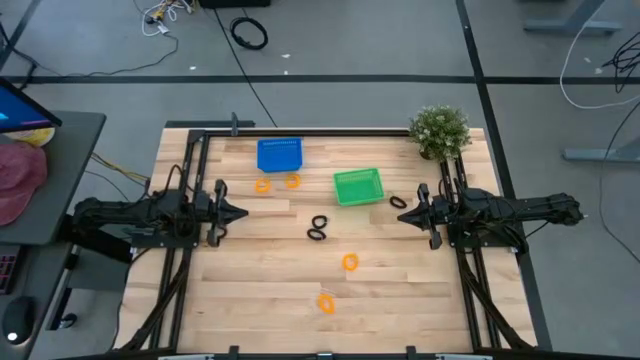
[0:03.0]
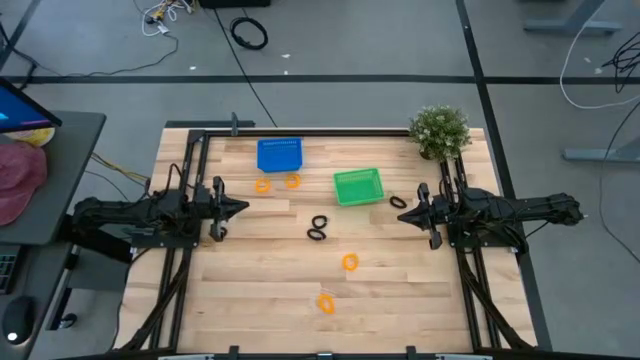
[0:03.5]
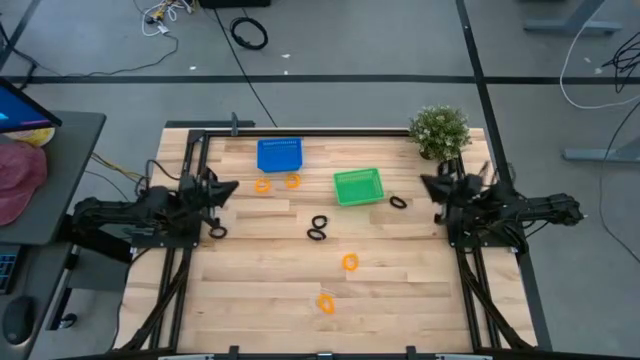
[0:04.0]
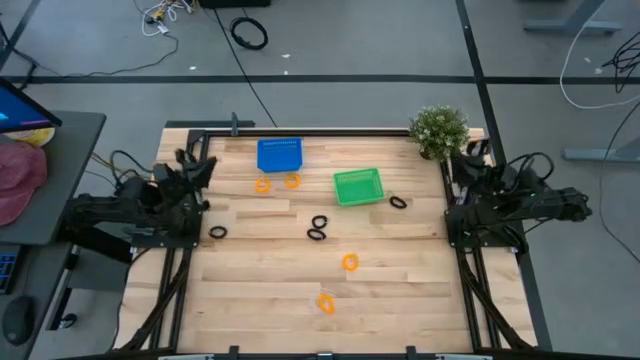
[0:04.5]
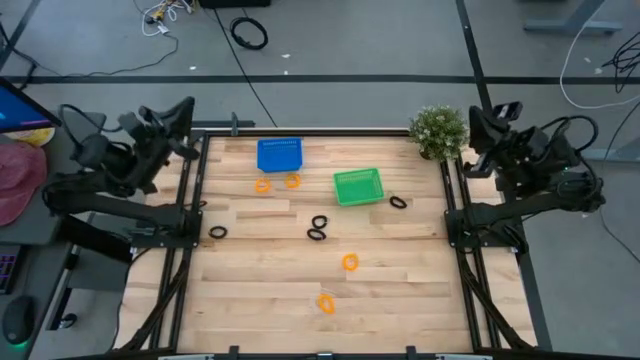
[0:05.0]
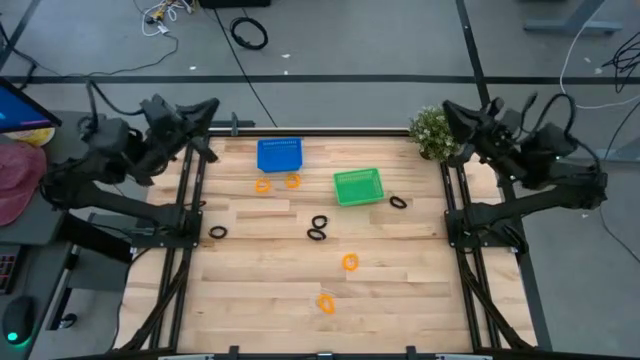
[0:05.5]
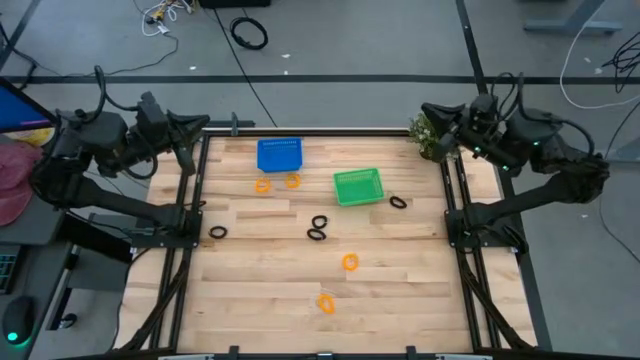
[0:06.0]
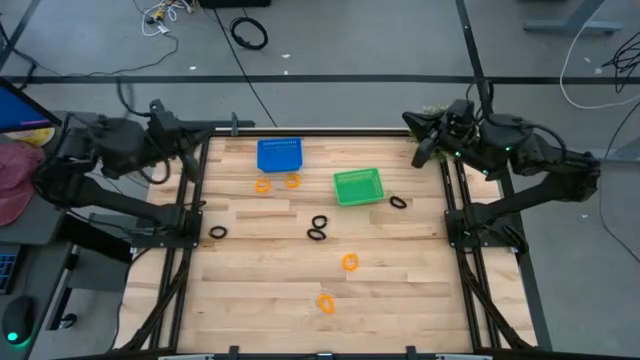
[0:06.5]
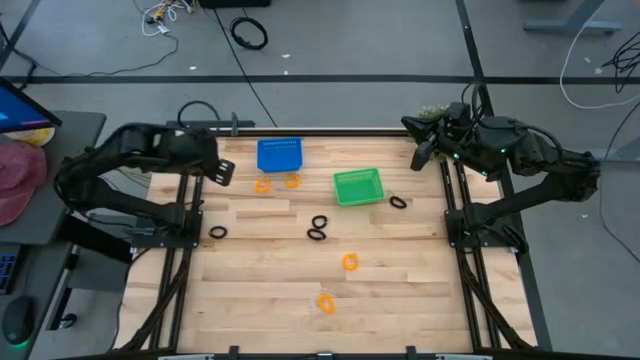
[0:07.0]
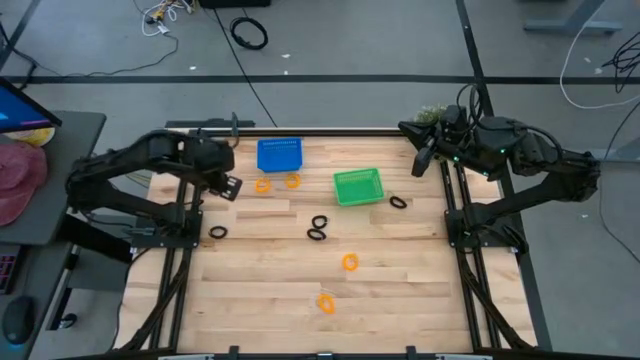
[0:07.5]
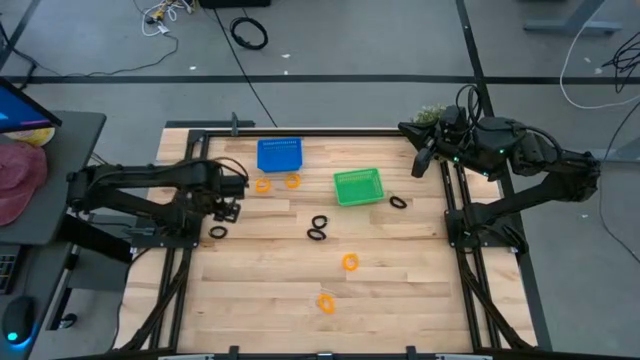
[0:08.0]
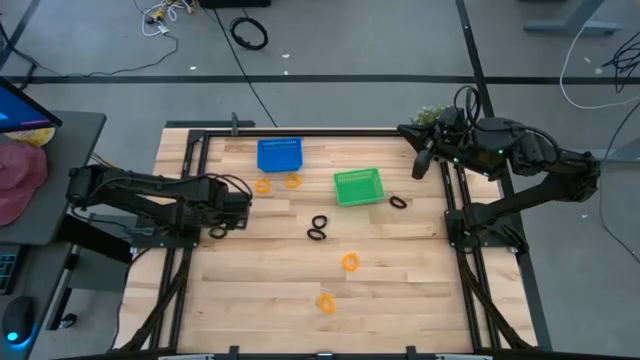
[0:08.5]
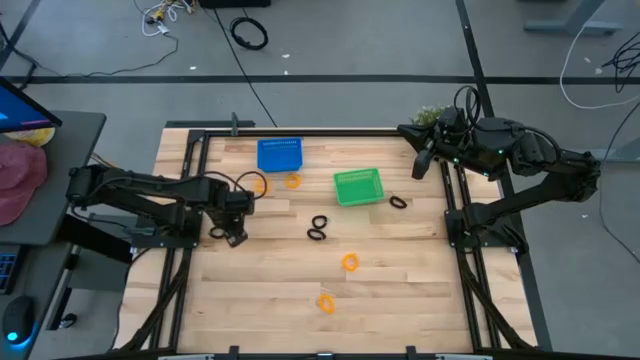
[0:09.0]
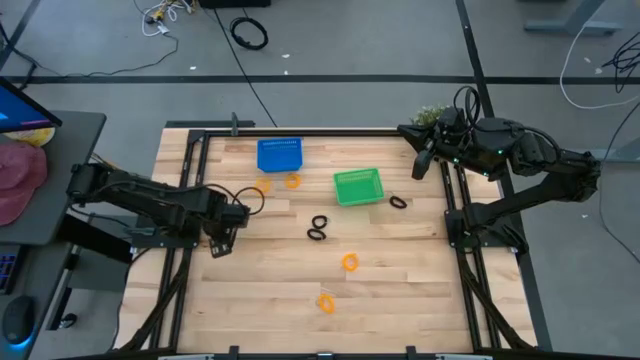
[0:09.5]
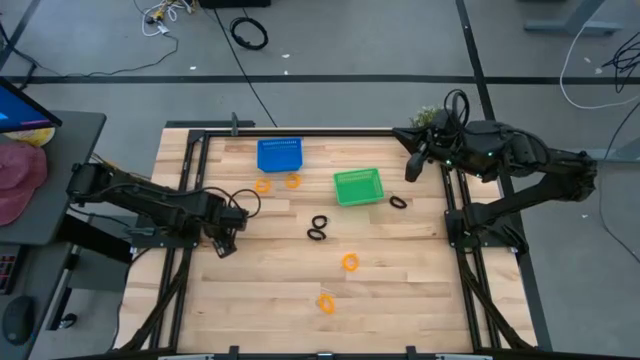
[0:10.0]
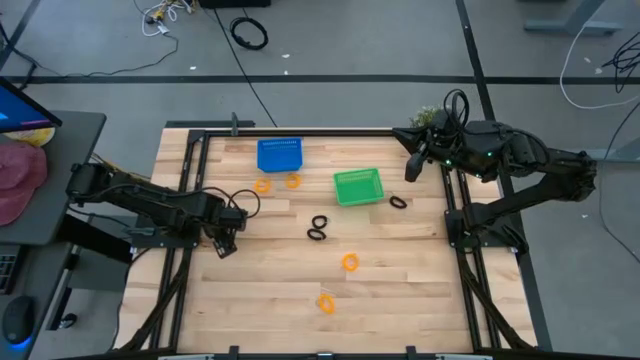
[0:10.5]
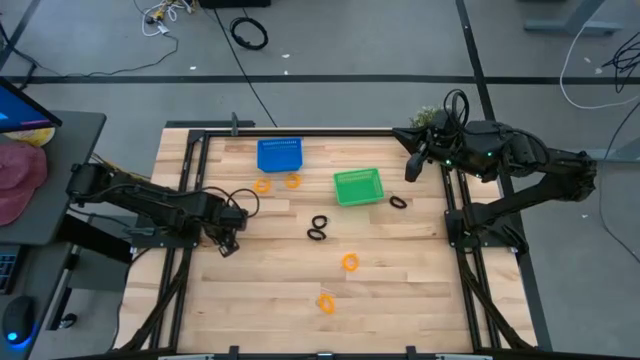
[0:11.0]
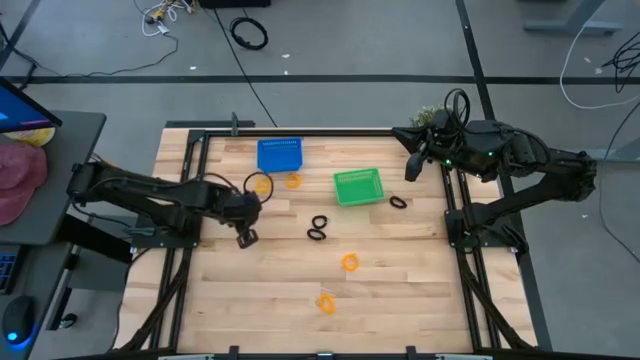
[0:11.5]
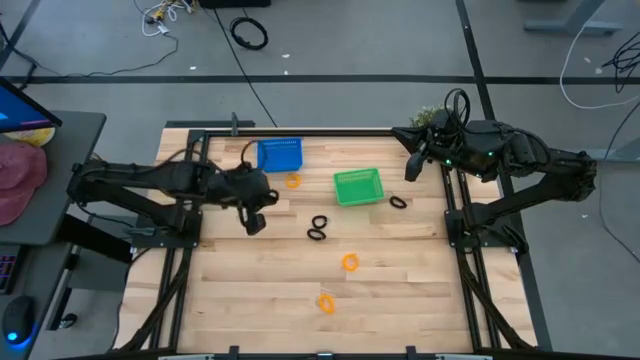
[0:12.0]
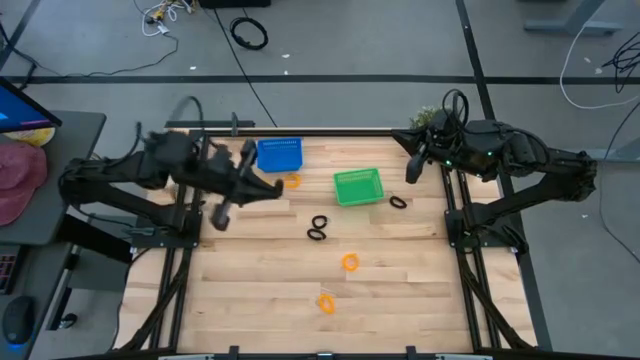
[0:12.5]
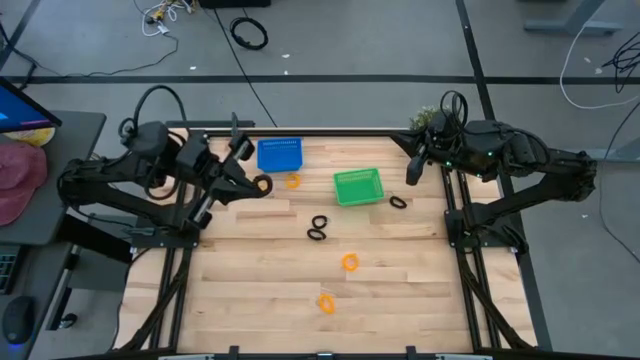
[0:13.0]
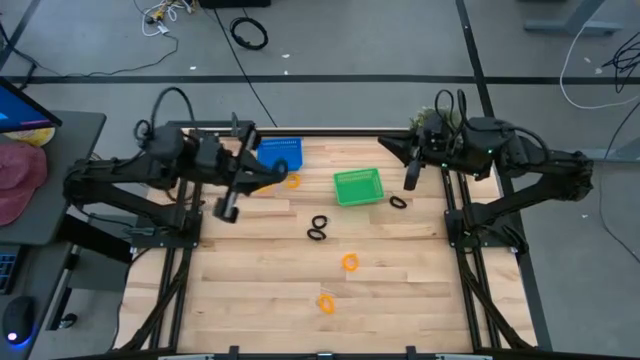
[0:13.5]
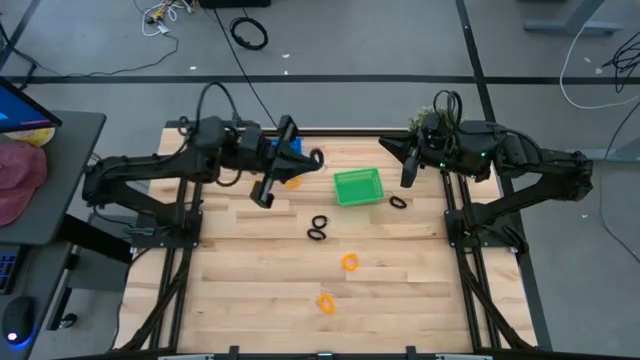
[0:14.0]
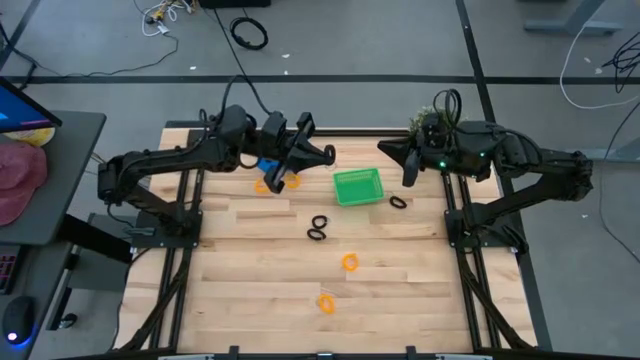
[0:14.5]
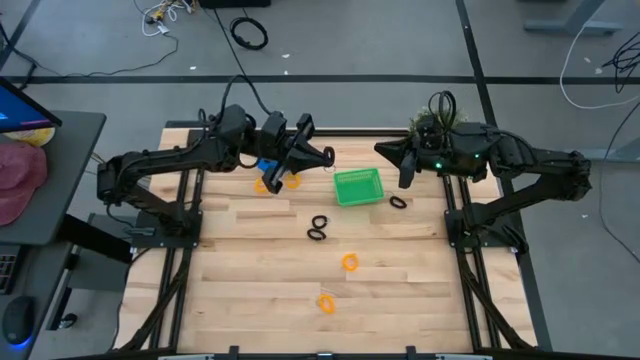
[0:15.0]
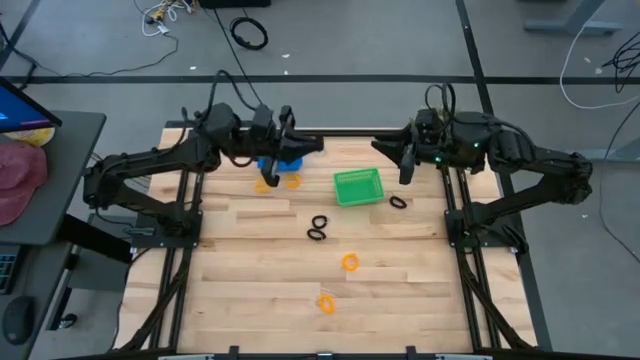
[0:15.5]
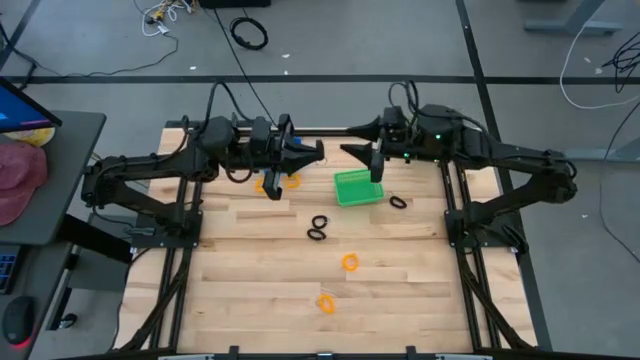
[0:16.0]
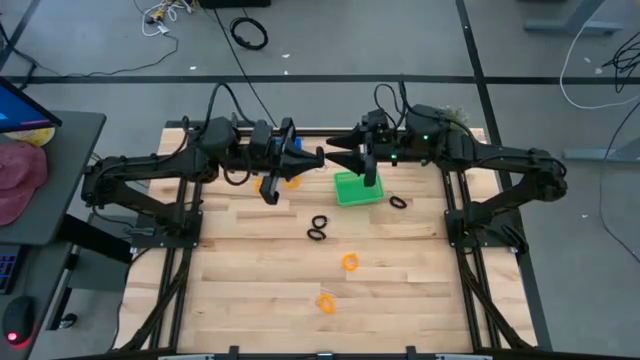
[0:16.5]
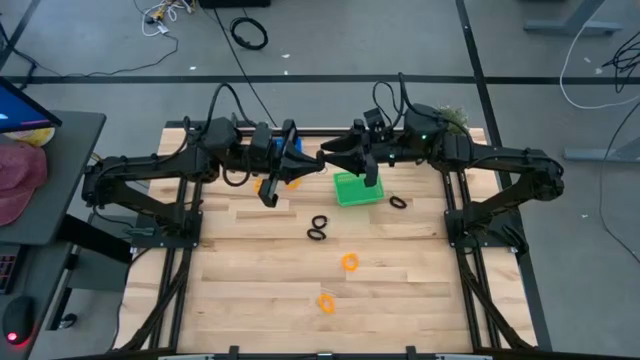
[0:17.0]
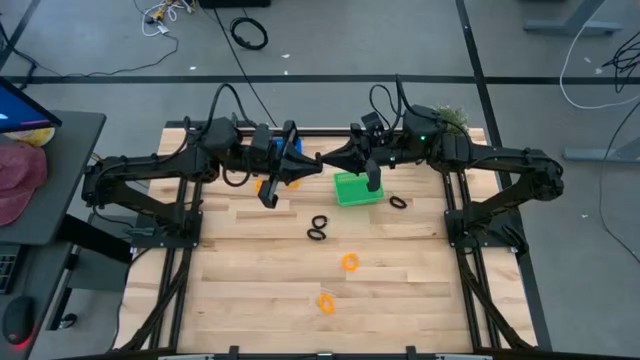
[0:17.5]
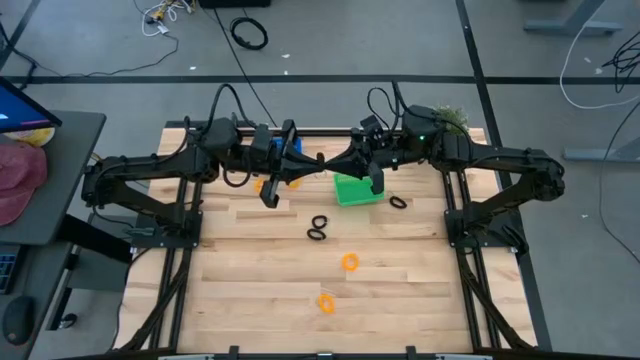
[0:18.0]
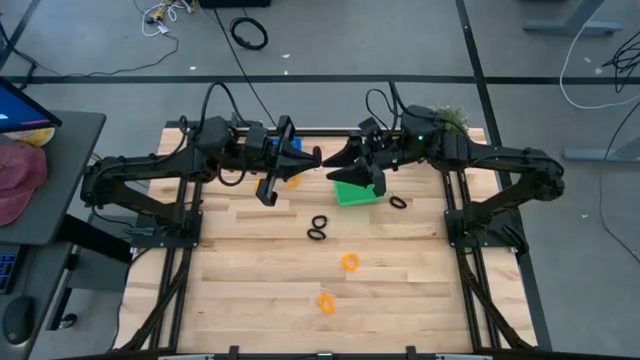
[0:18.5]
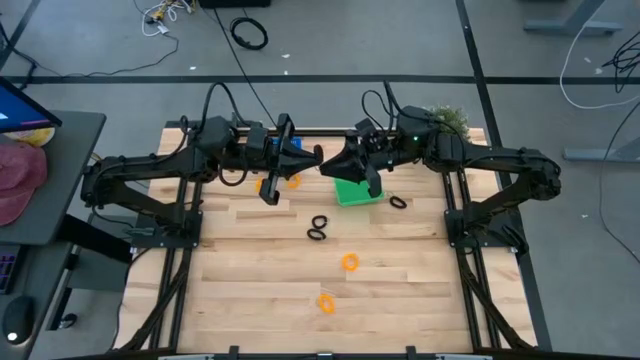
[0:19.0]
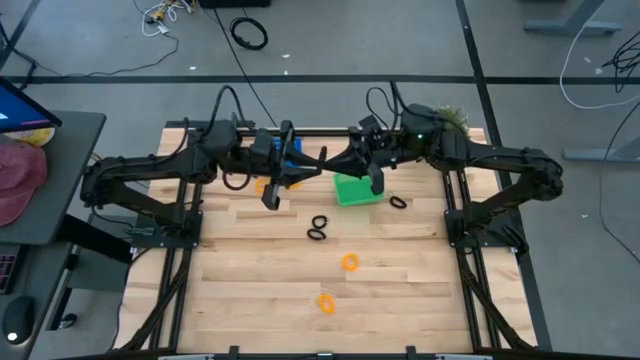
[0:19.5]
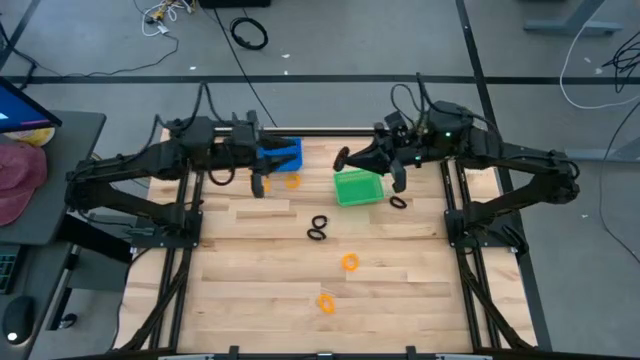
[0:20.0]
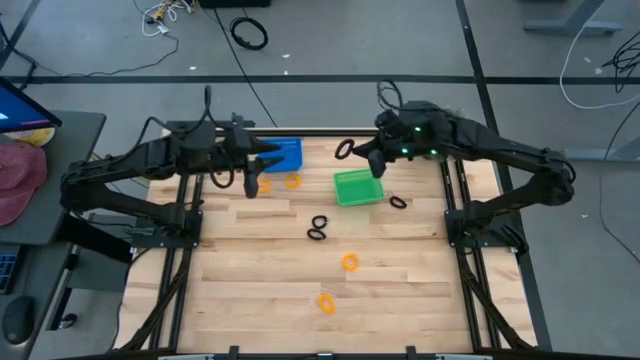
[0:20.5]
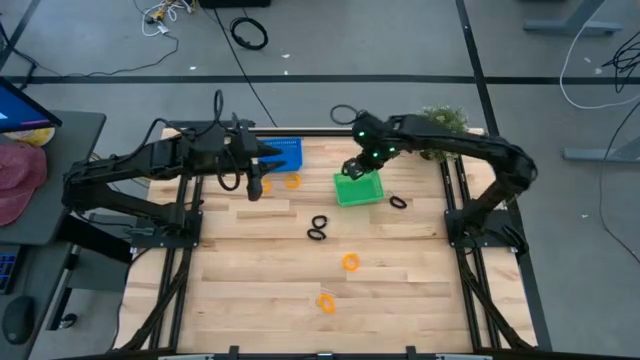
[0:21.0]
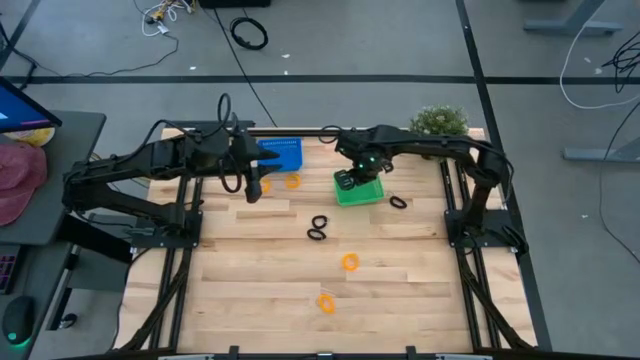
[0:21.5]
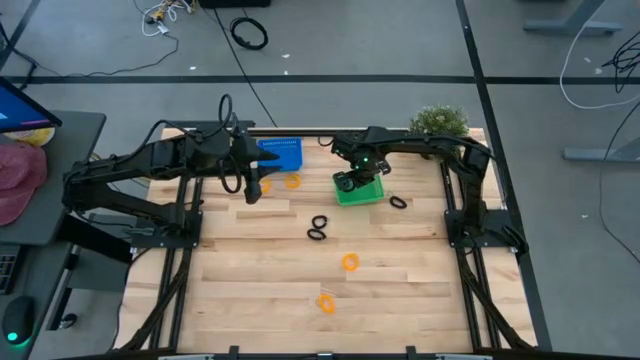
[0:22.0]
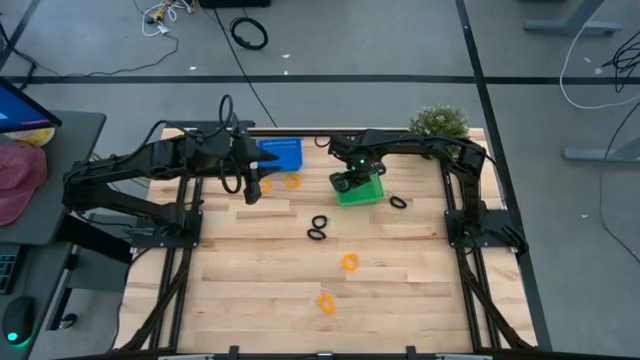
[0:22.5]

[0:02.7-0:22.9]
Task: Sort spring keychains
Put the black spring keychain into the green bin
